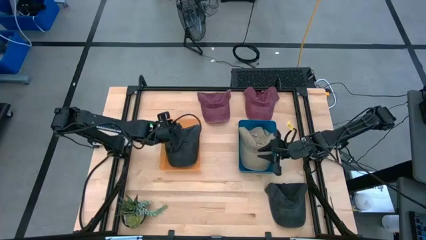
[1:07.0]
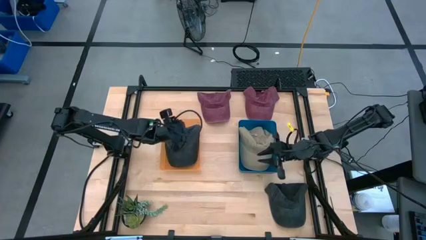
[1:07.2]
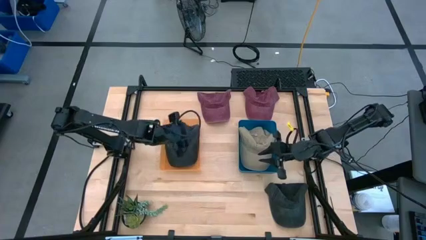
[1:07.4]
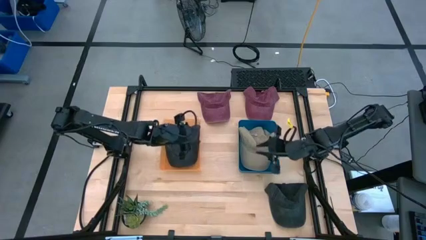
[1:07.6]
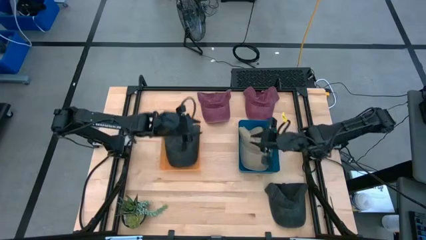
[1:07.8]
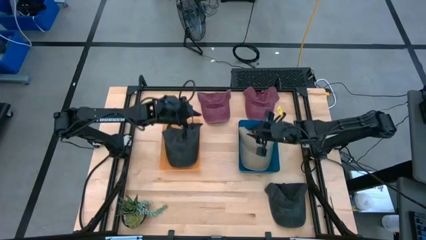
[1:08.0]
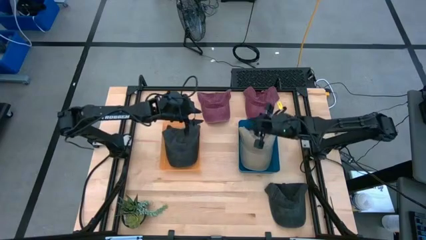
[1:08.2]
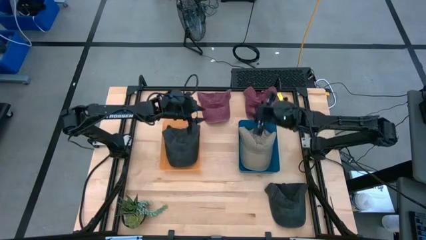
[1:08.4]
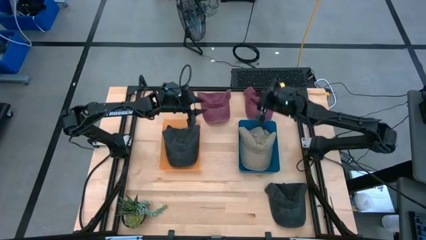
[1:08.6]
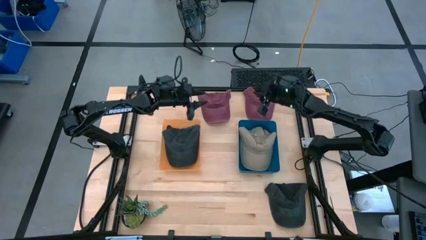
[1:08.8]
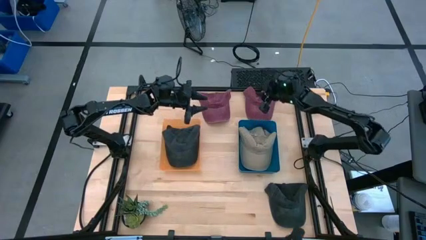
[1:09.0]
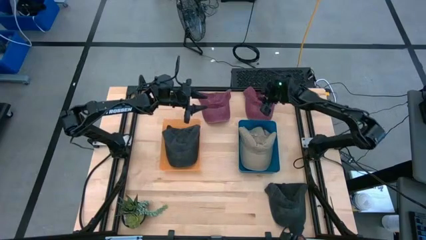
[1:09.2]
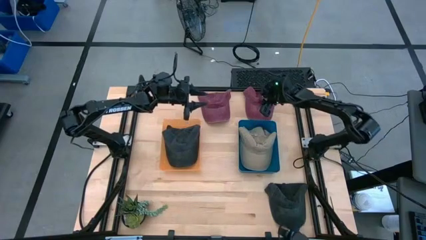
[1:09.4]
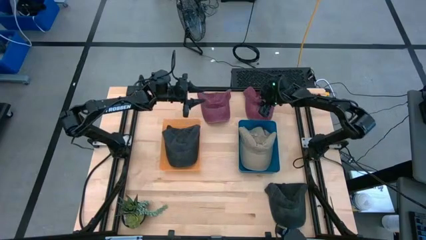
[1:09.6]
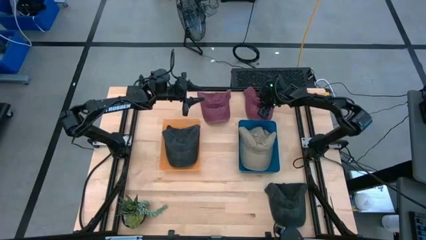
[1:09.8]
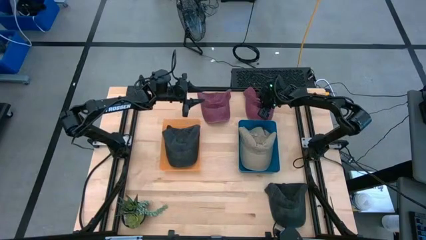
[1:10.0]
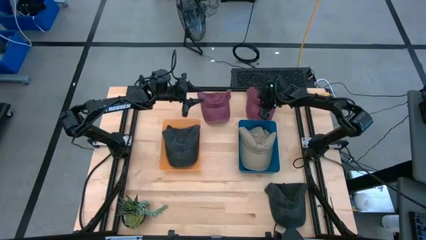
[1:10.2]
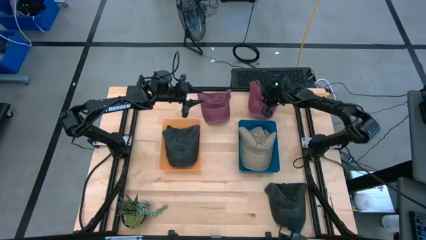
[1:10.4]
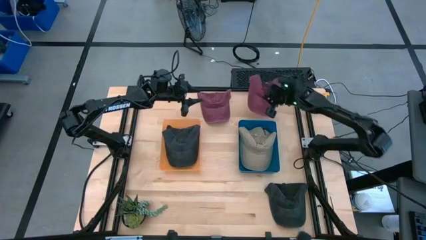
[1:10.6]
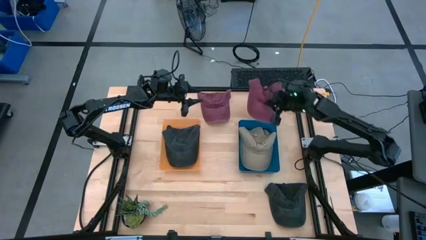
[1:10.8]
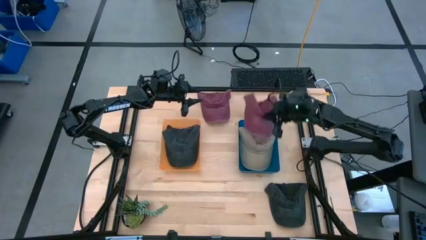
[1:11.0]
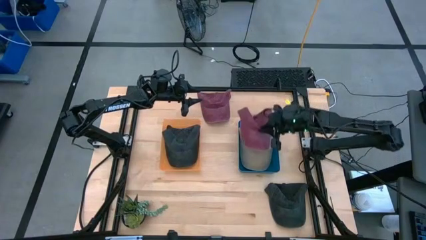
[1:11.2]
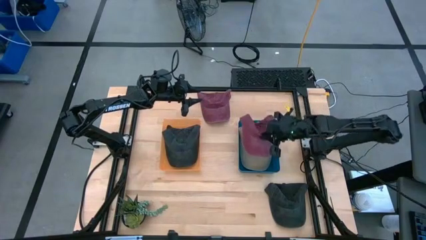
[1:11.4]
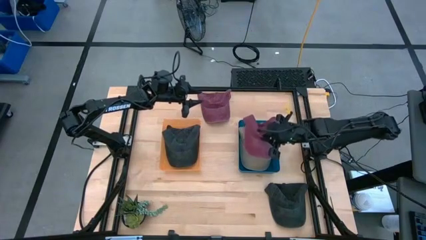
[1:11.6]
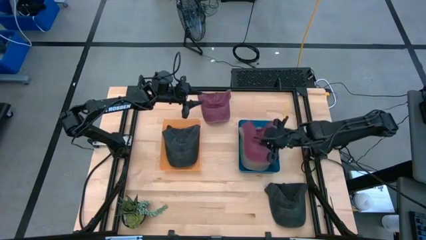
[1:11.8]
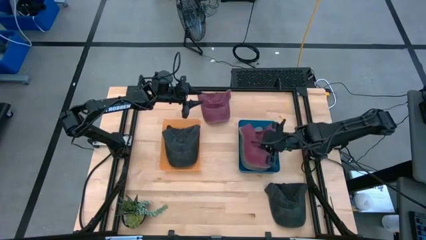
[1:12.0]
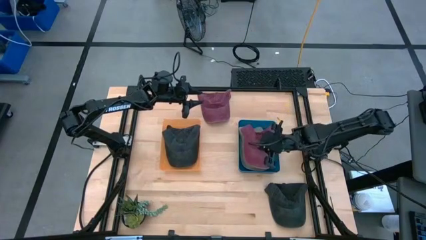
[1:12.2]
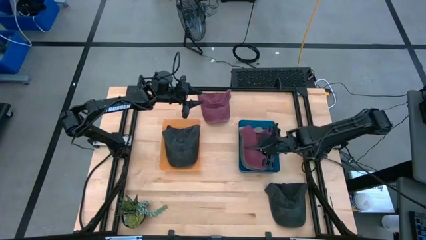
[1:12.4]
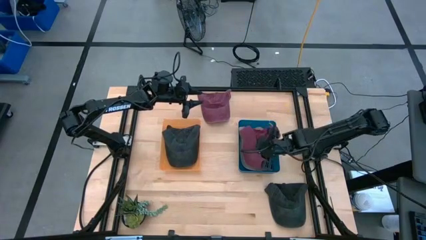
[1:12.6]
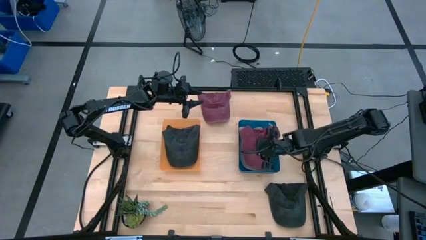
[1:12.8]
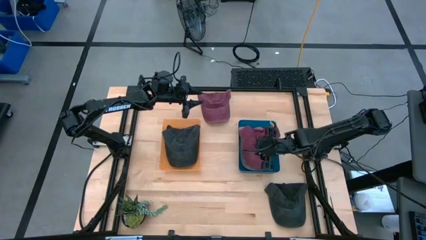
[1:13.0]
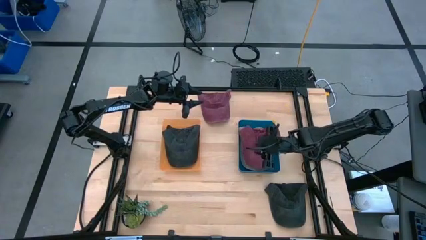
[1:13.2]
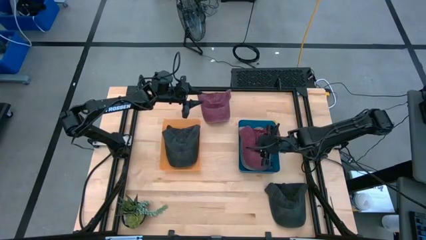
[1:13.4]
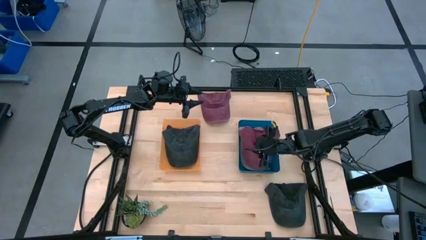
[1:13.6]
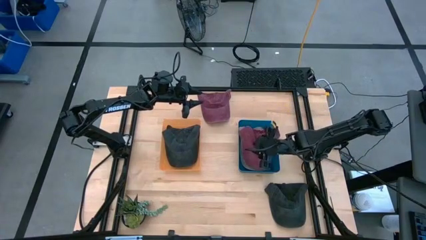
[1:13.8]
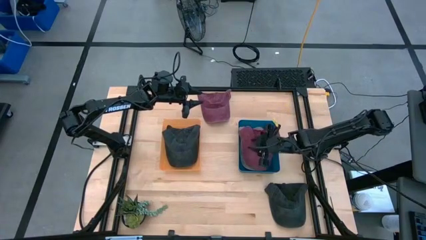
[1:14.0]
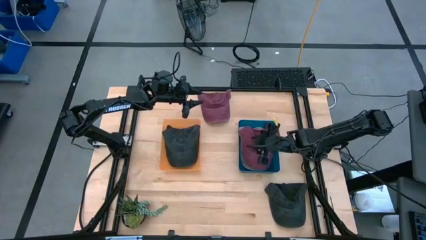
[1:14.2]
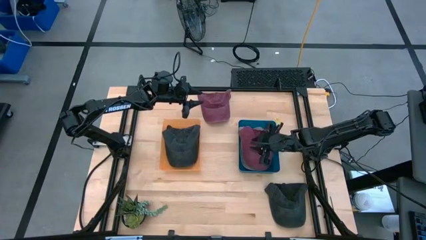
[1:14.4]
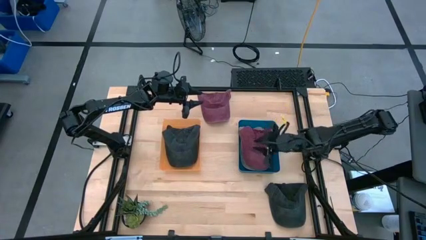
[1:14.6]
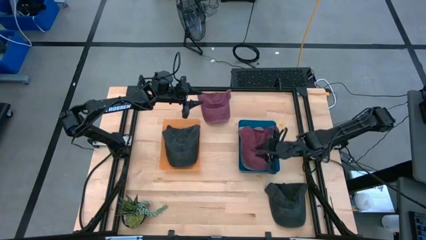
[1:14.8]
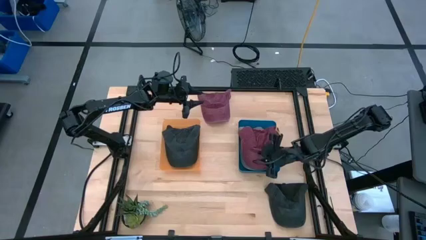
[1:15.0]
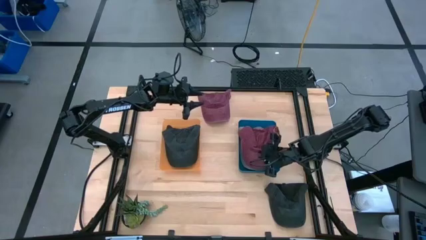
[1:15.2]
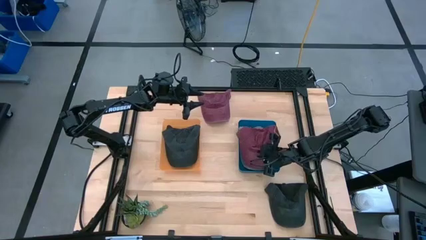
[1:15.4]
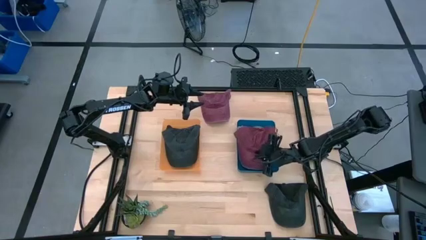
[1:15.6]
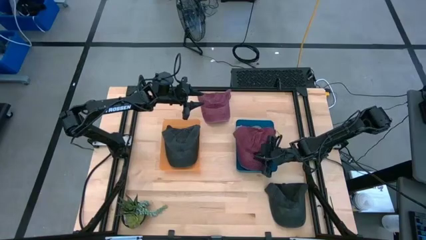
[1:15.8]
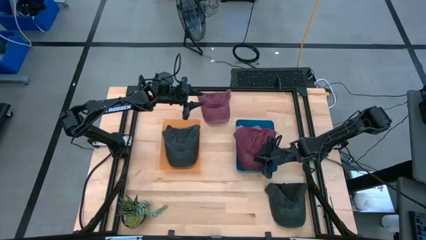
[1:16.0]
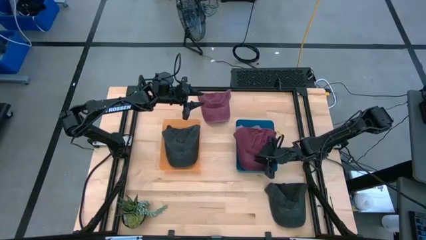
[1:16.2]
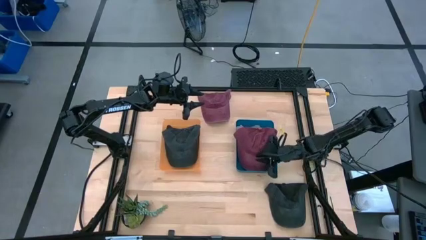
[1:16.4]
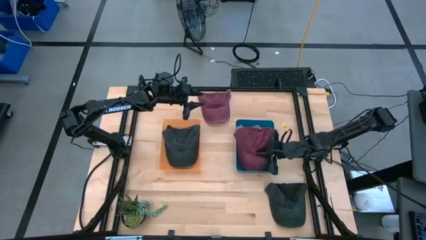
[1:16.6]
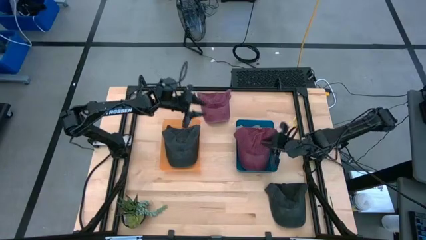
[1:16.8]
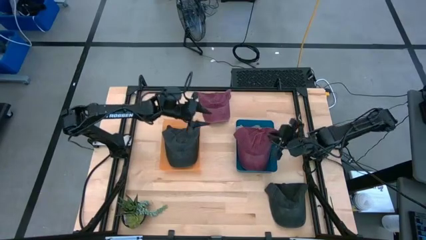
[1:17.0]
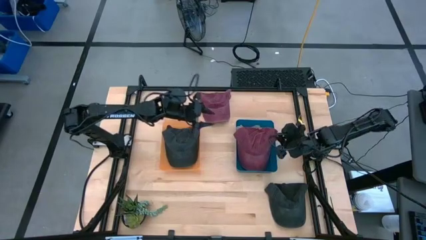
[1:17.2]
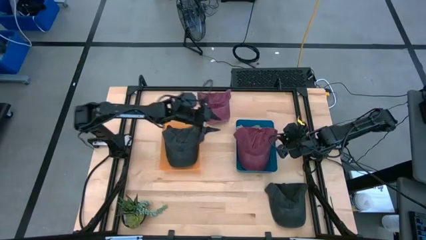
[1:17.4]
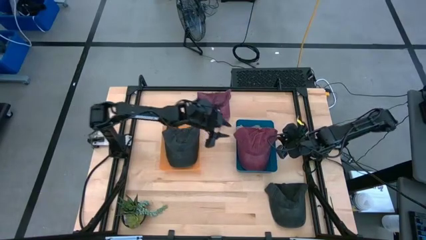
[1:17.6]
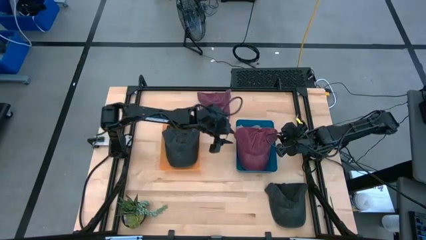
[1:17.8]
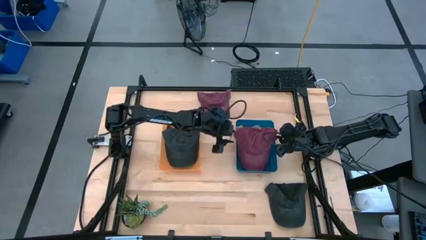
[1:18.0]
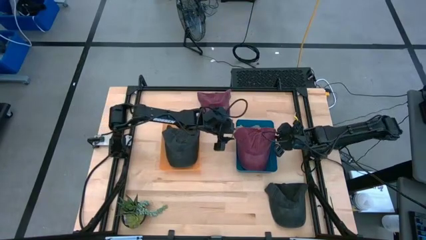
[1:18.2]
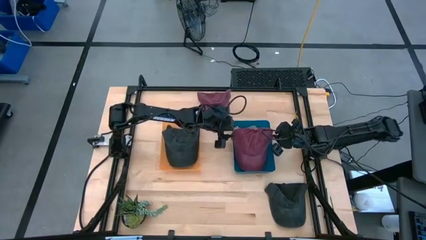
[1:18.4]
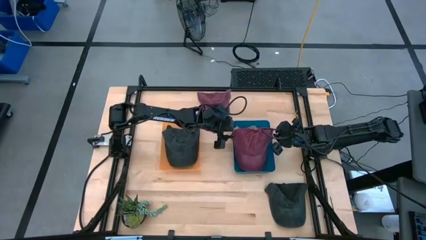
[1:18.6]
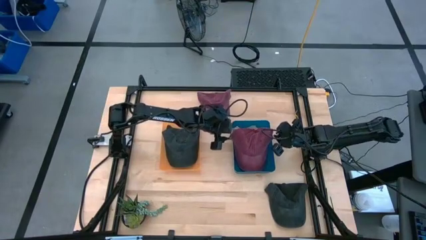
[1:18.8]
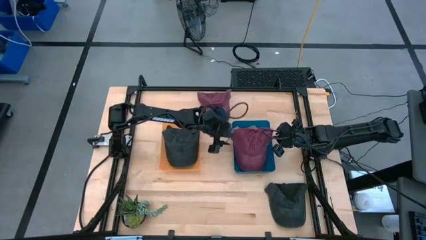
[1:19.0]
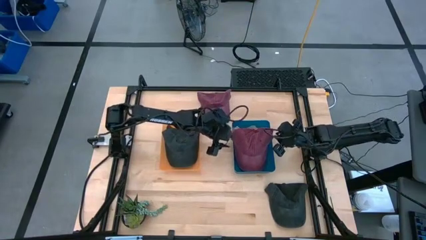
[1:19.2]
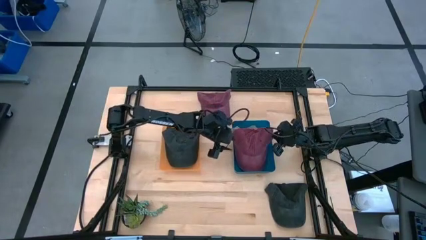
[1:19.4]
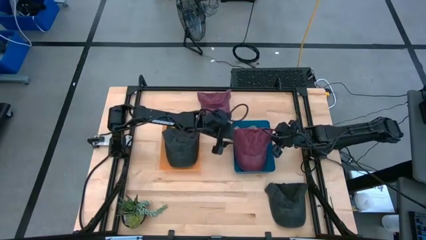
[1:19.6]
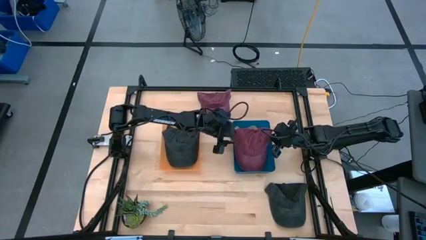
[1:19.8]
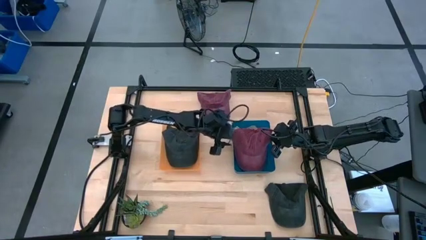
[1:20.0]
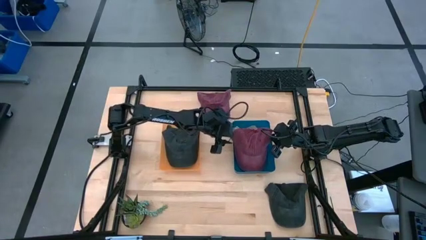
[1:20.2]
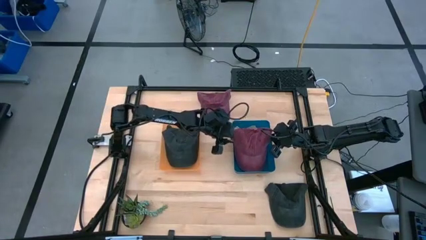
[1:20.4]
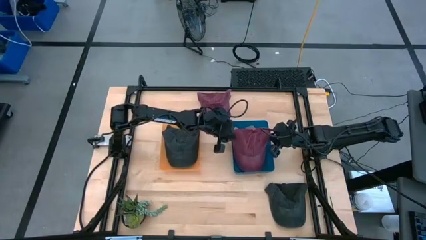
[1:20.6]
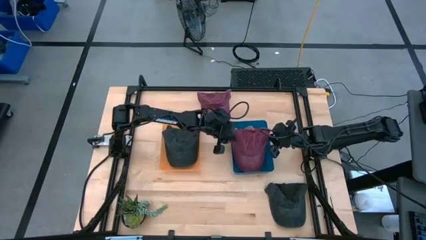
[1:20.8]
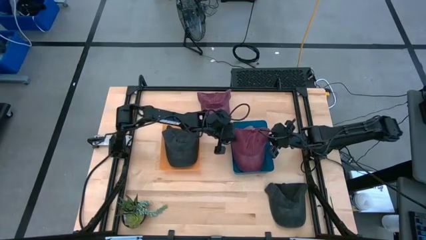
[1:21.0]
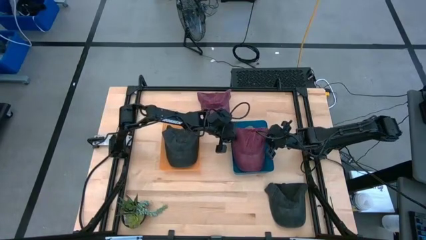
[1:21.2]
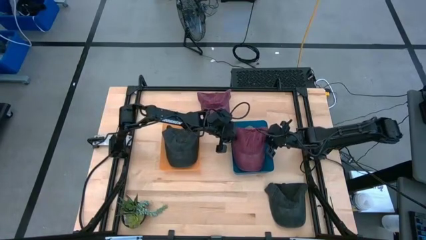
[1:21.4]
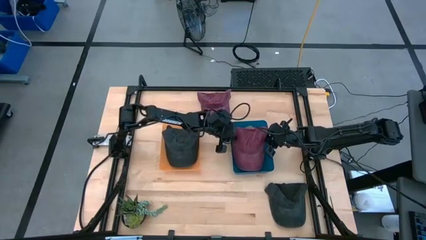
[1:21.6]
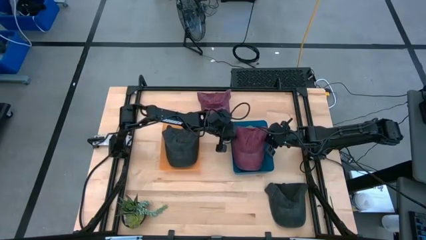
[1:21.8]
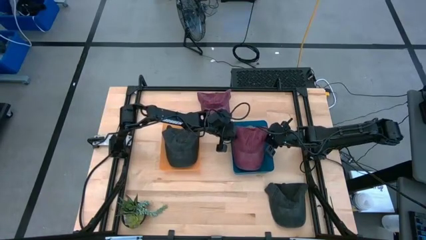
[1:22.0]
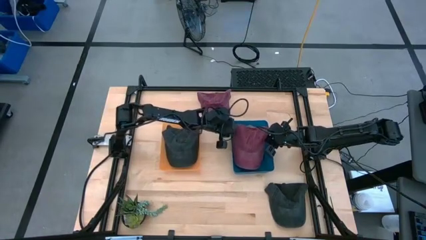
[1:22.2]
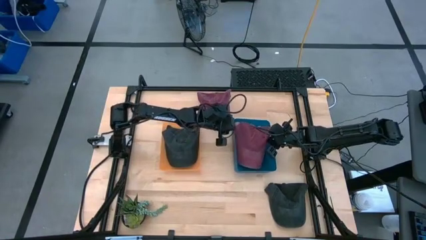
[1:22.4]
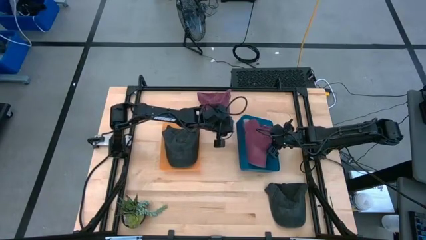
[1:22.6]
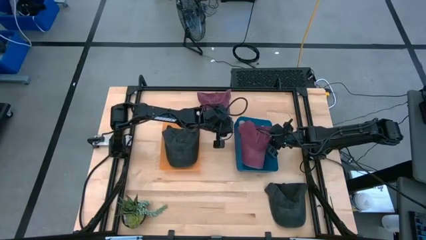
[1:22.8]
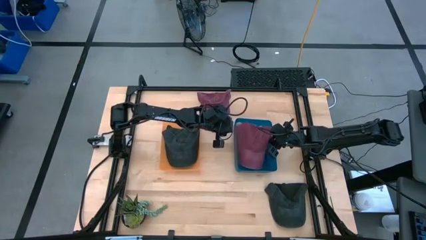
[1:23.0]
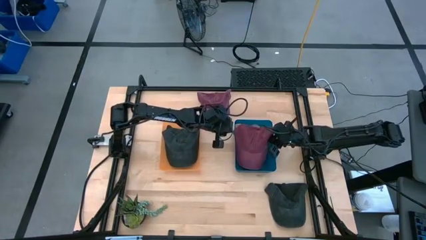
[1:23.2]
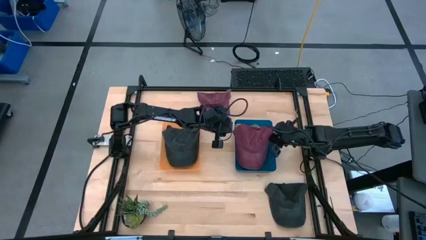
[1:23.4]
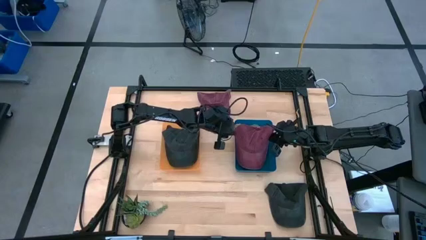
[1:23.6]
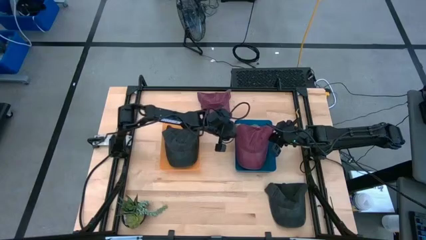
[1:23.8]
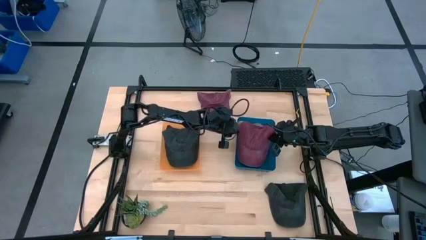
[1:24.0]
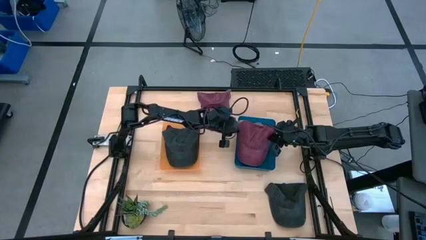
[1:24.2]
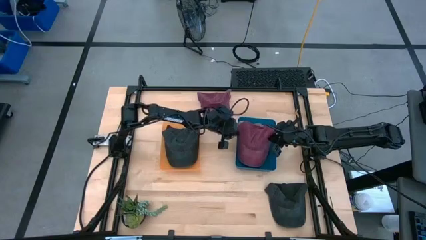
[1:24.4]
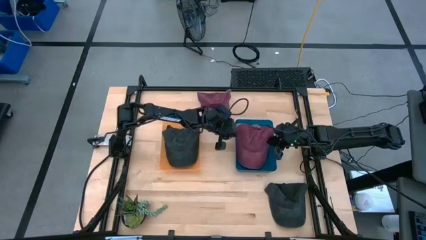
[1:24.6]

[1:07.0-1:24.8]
Task: Pick & Place hat
Put the right red cap into the blue bin
